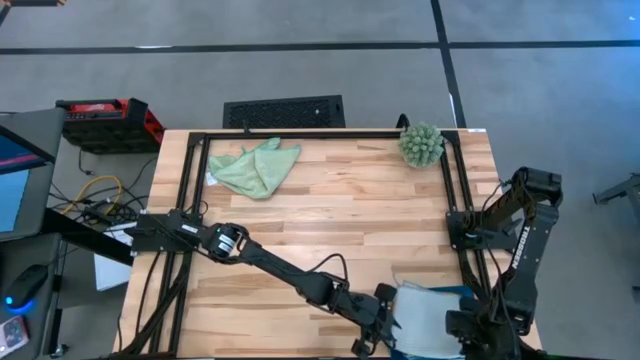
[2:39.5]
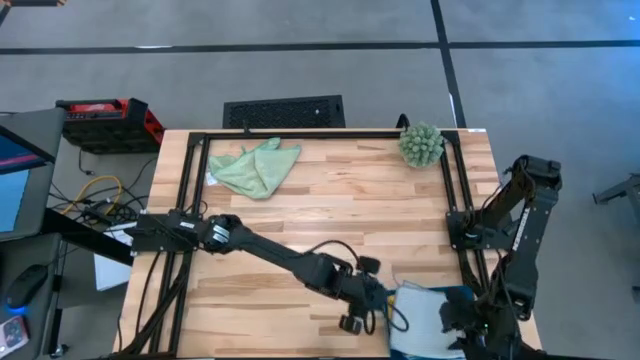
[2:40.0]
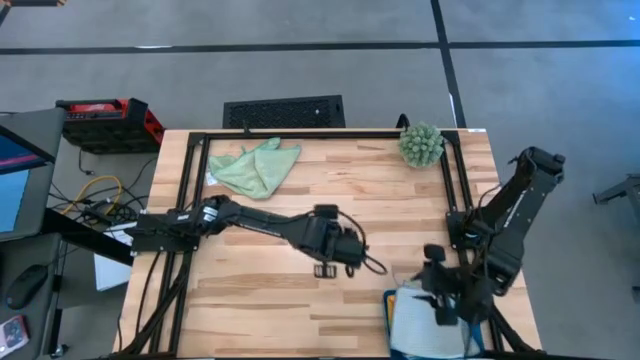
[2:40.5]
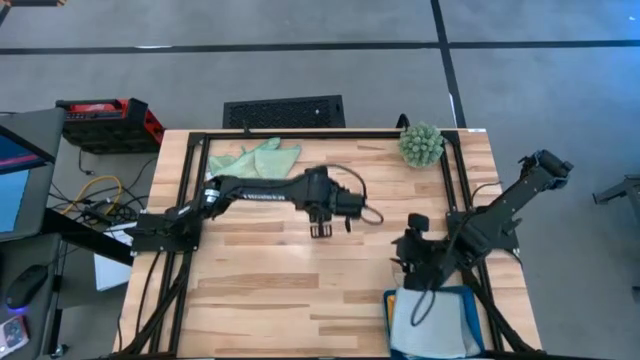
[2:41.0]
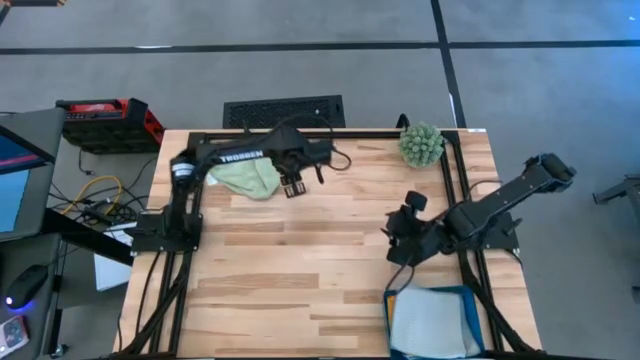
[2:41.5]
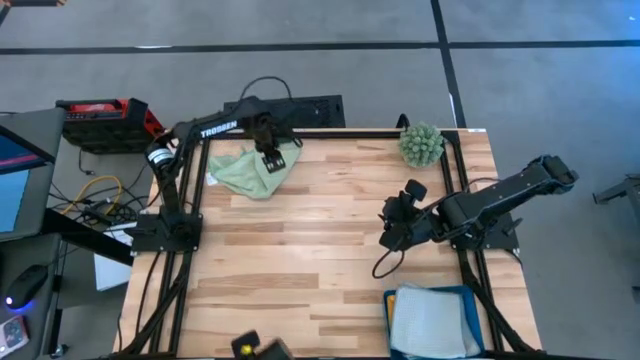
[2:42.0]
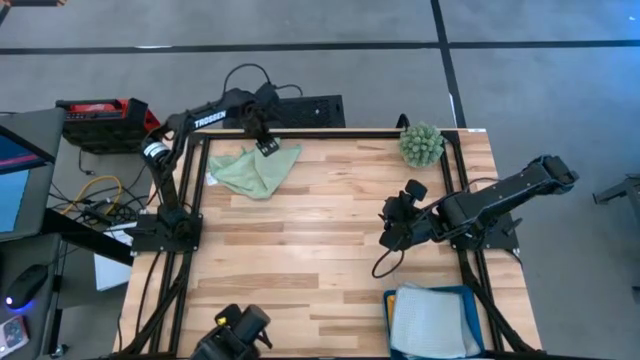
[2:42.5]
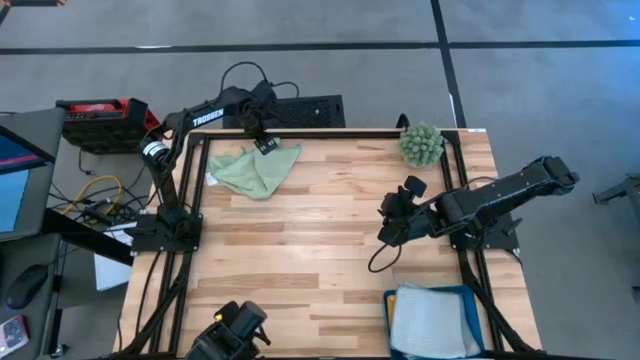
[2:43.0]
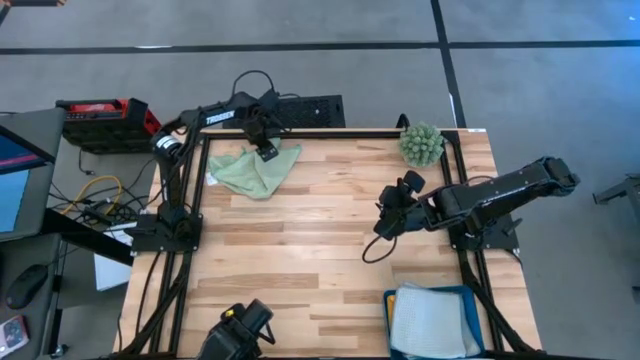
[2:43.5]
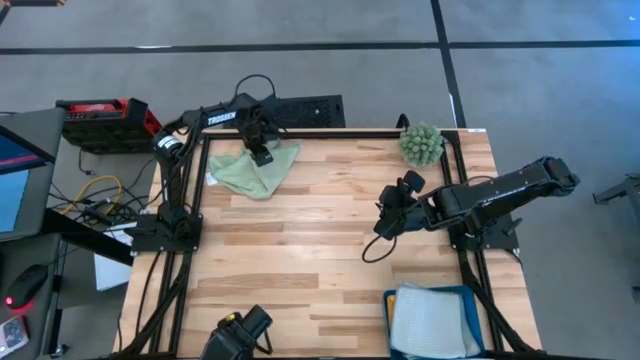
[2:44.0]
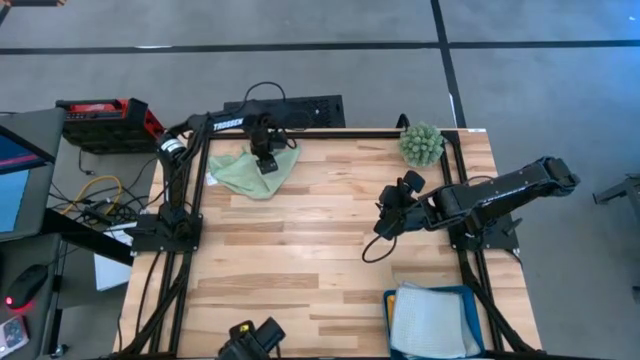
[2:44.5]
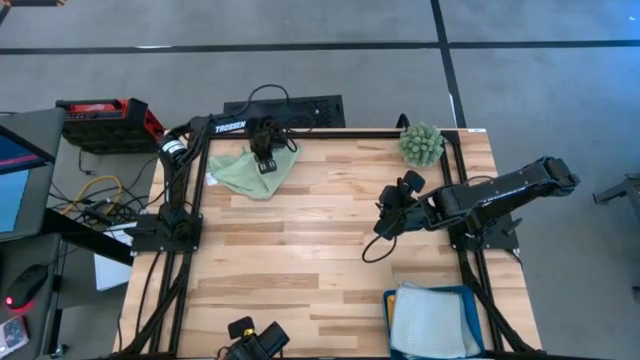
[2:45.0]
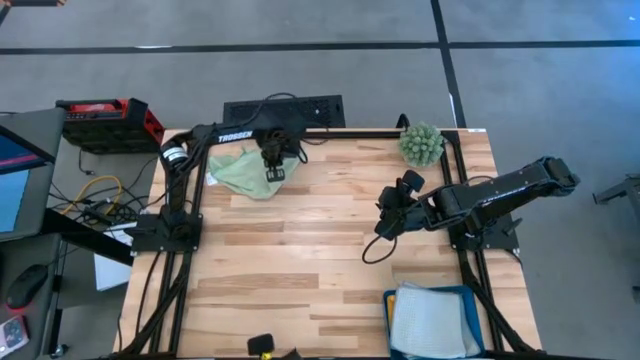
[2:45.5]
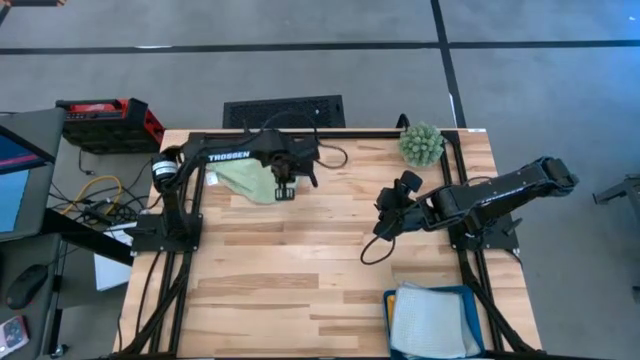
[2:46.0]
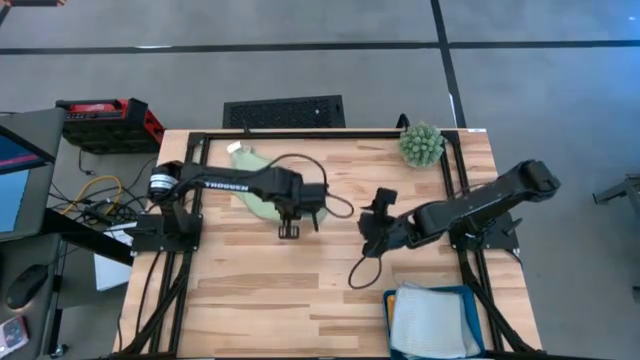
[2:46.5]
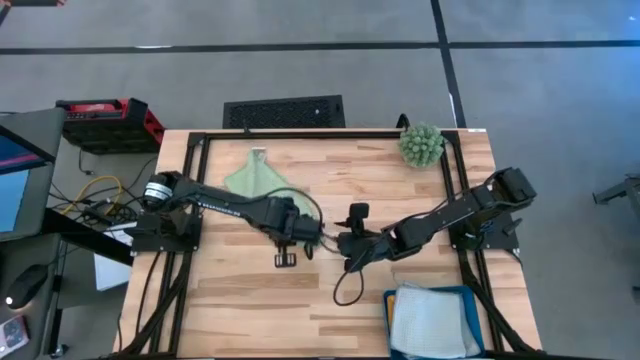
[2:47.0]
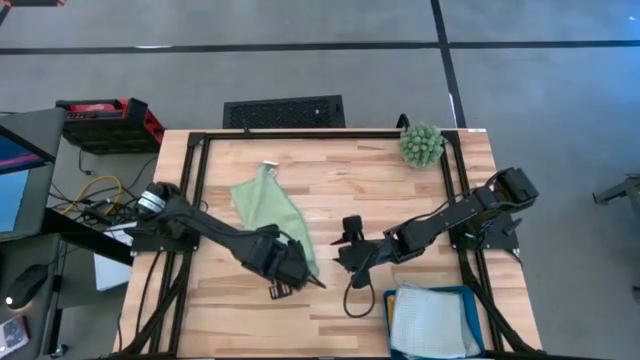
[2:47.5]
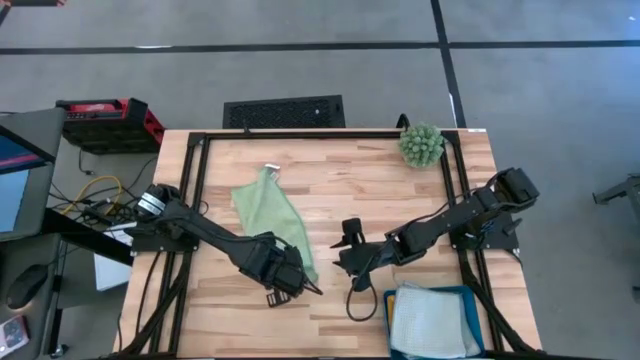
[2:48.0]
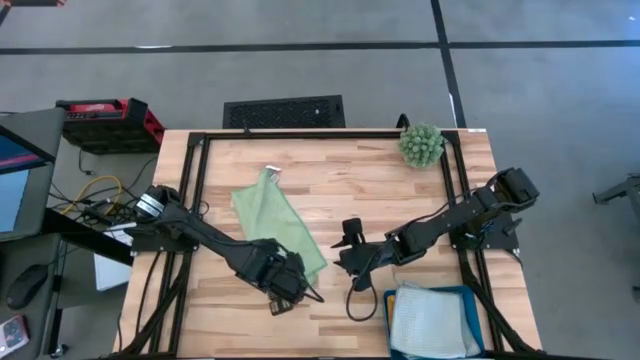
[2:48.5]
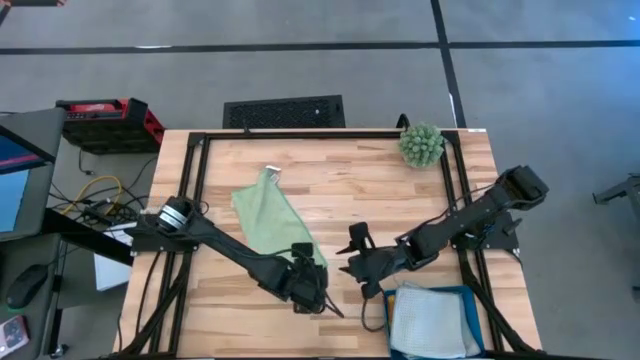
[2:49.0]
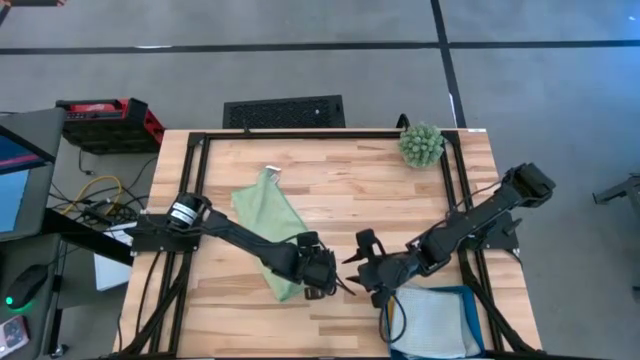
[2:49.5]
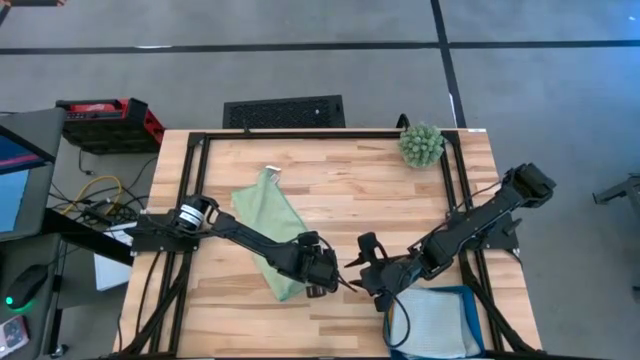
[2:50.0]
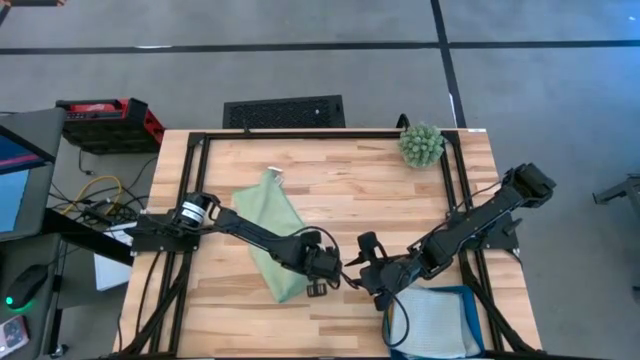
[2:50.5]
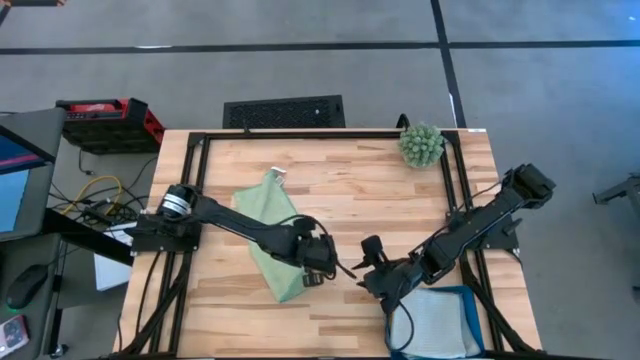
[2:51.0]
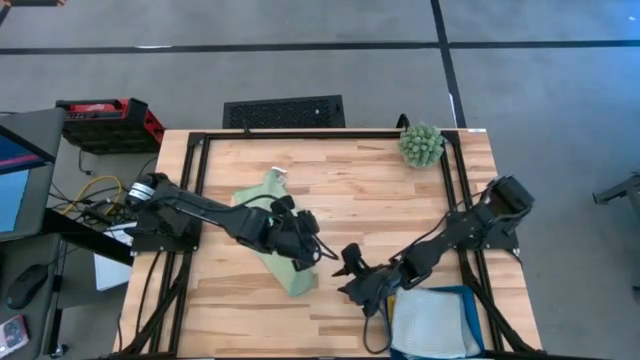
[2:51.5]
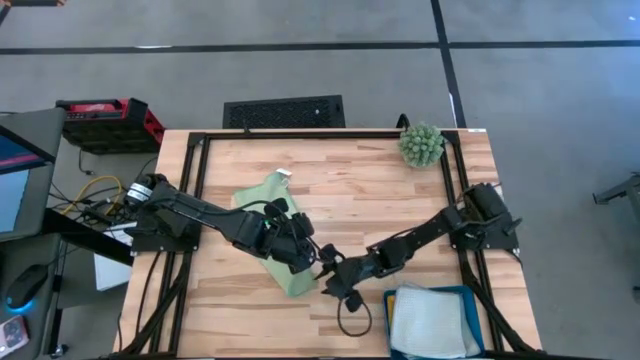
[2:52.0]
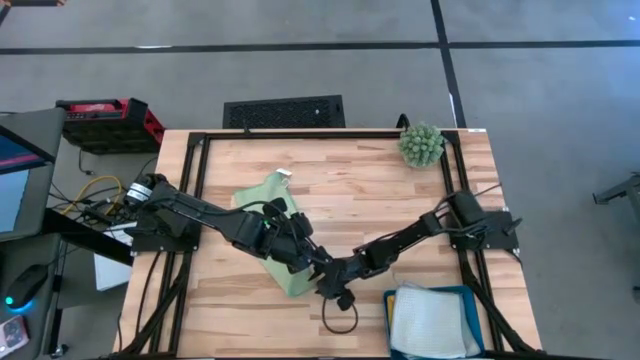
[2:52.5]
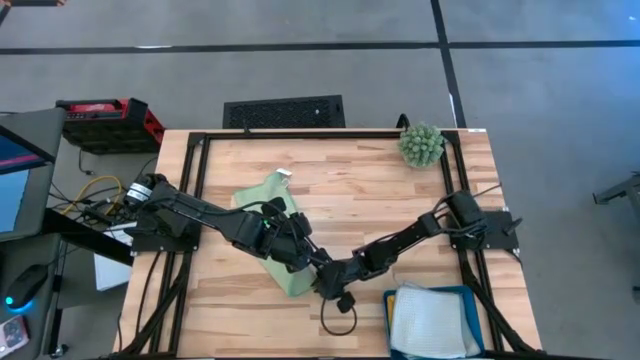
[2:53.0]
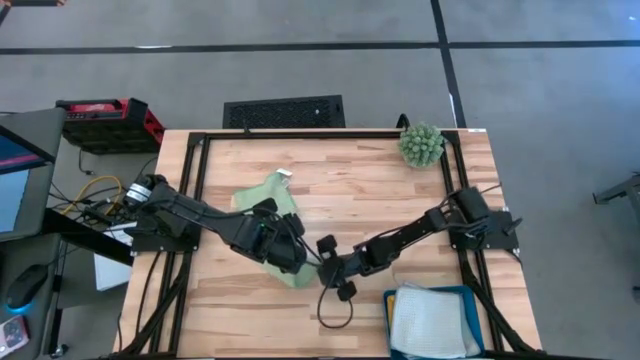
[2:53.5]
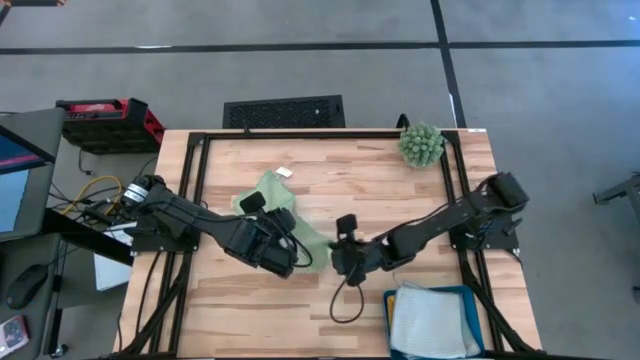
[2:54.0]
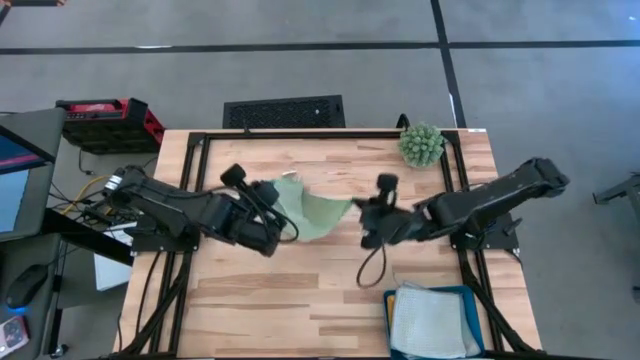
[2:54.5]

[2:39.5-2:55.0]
Task: Fold microfiber towels
Fold the green towel

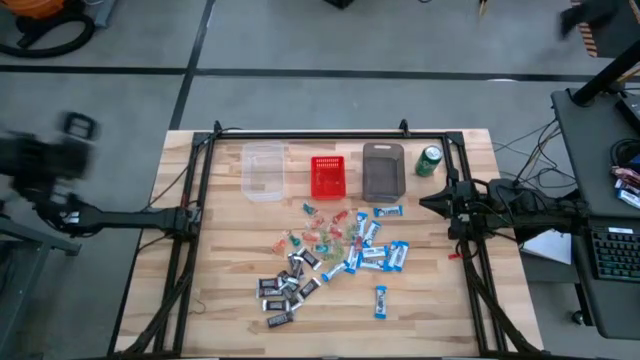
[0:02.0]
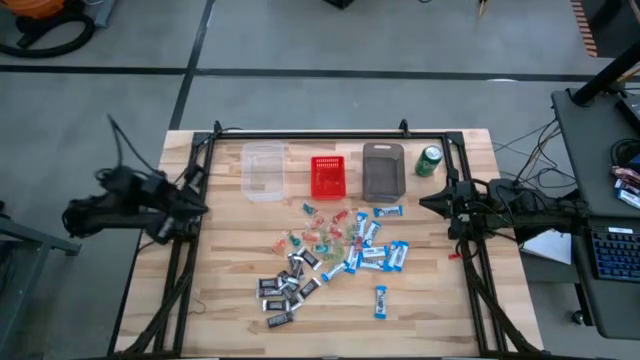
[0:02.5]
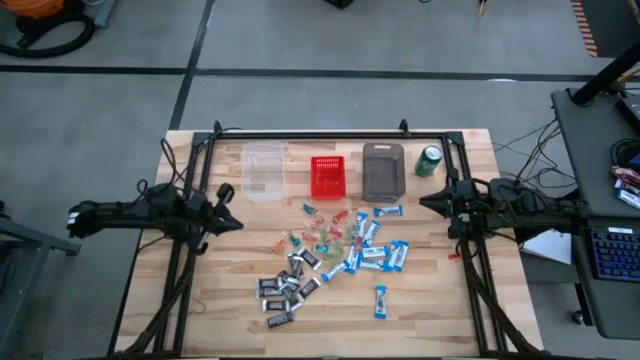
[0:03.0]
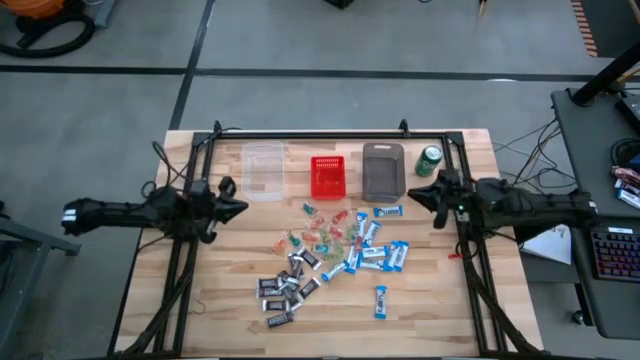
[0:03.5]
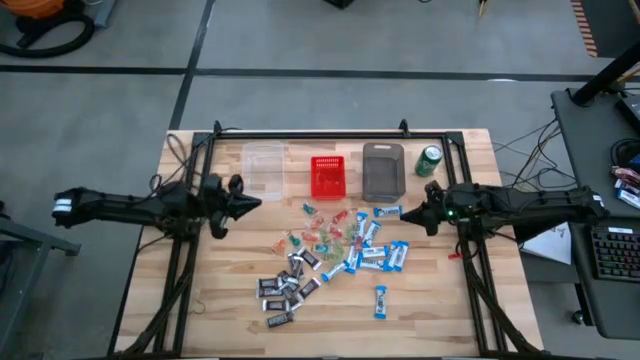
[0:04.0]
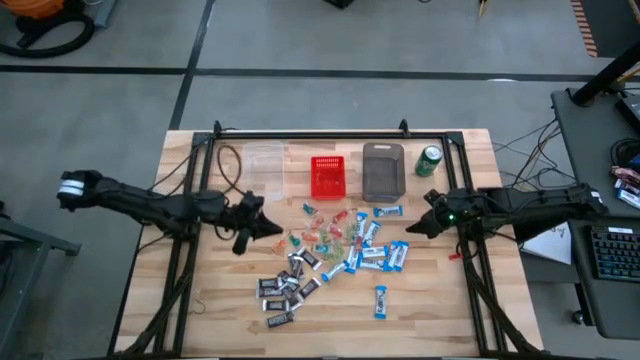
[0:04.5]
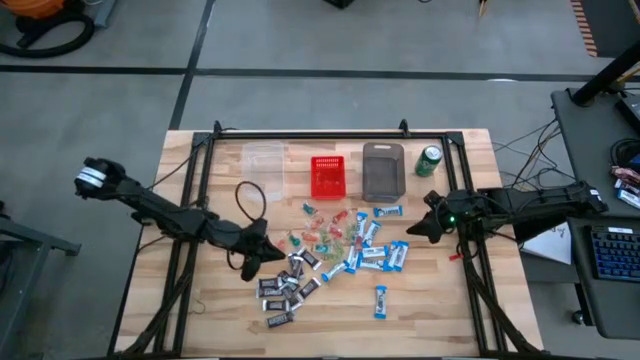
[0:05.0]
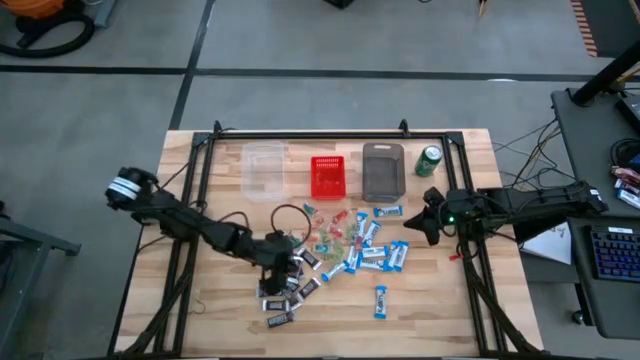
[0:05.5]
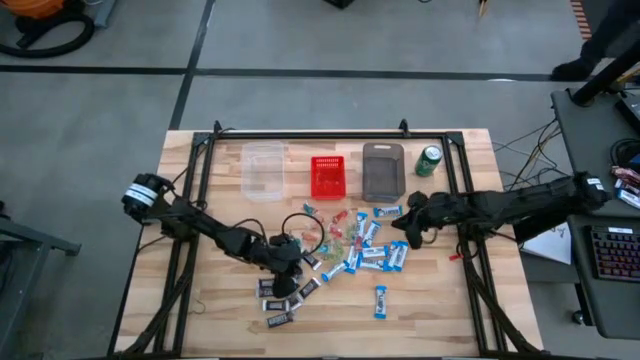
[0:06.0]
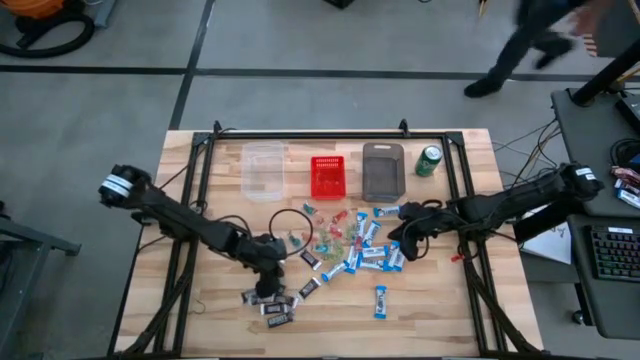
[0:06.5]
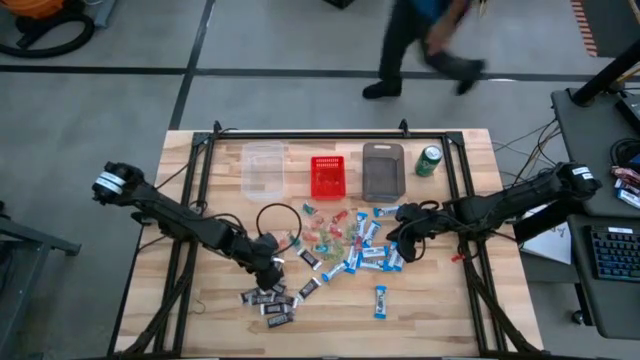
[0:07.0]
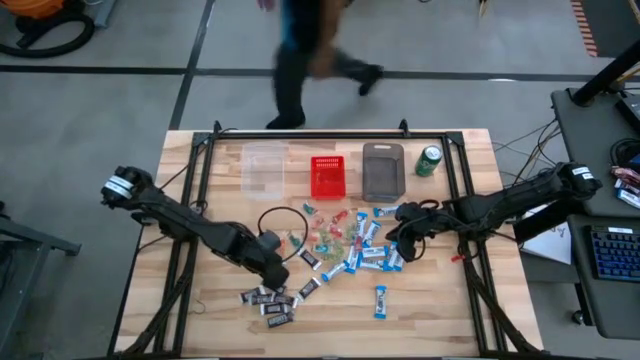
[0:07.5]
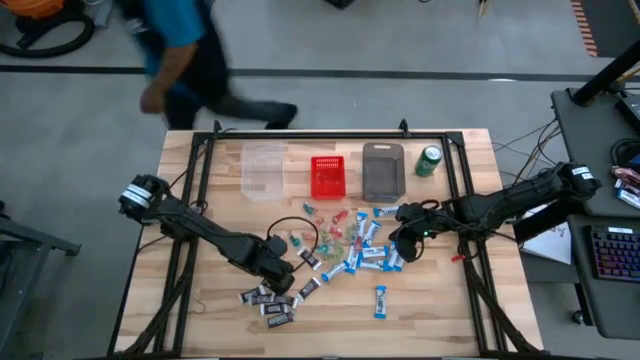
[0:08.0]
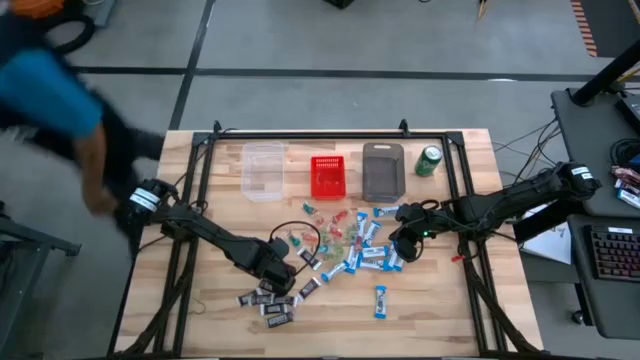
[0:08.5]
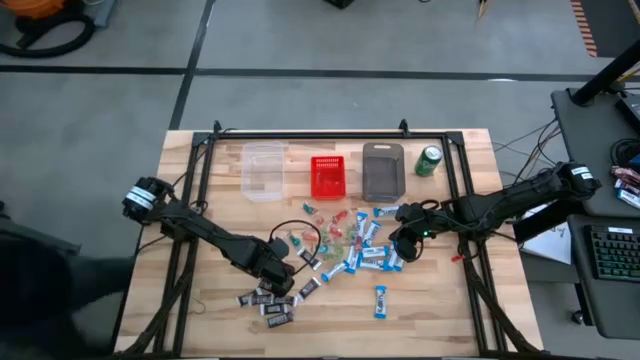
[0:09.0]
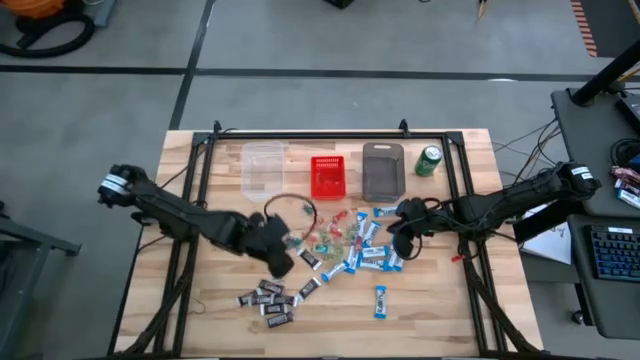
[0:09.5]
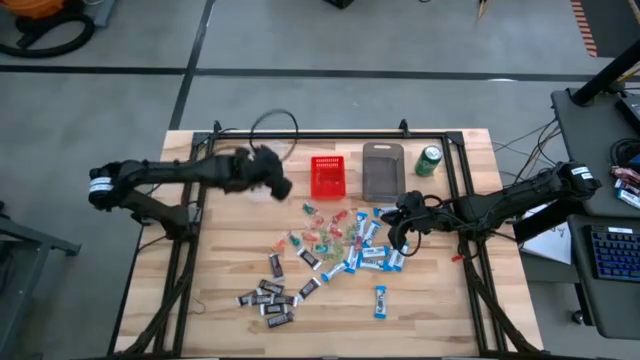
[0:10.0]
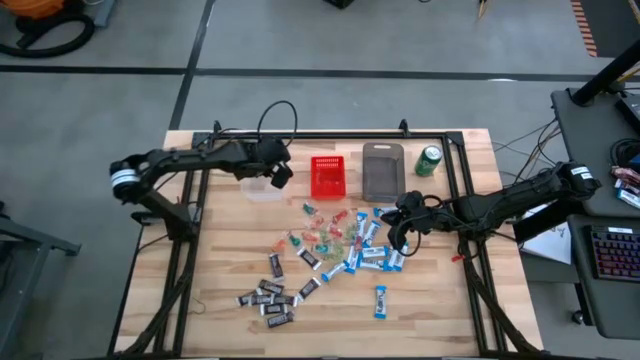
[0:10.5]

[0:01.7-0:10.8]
Task: Sort candy
Put the brown chocolate bar into the transparent bin
